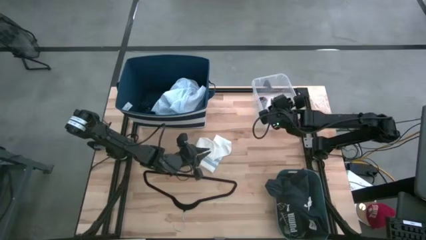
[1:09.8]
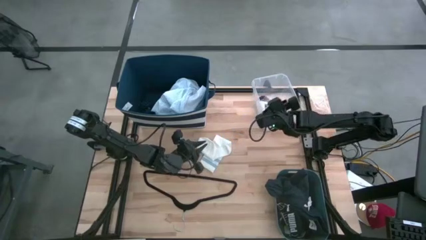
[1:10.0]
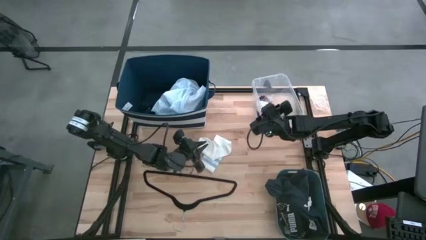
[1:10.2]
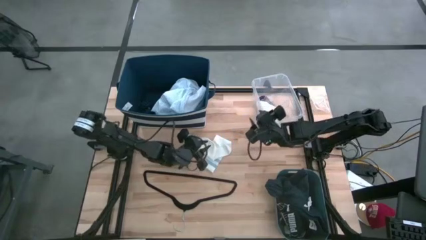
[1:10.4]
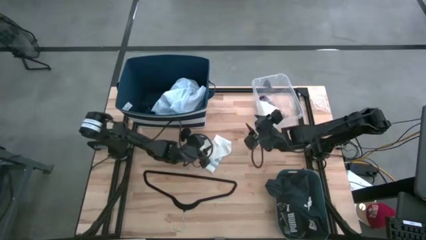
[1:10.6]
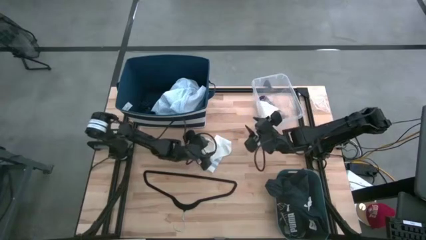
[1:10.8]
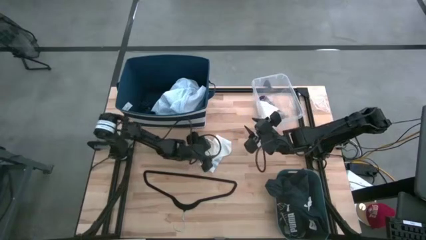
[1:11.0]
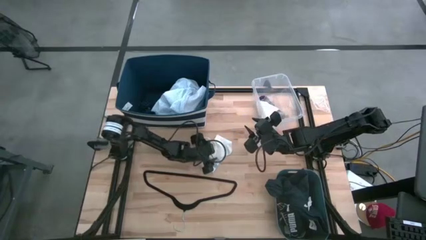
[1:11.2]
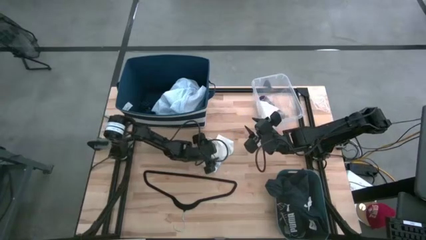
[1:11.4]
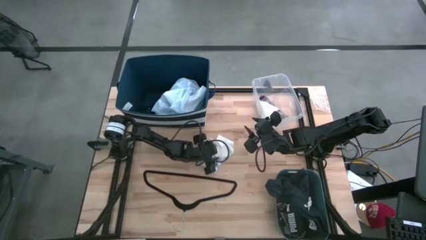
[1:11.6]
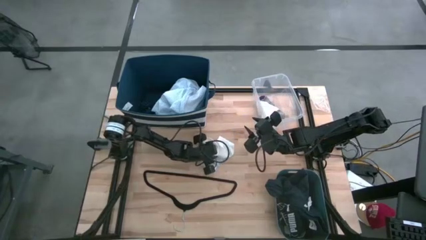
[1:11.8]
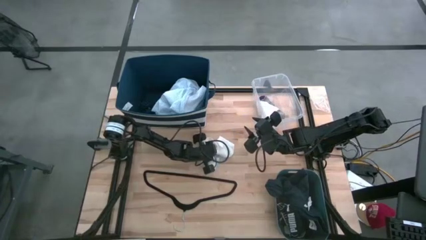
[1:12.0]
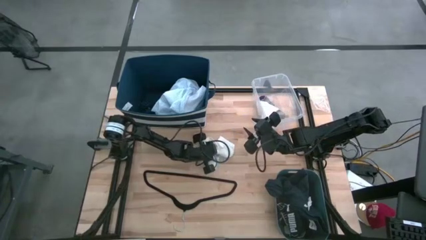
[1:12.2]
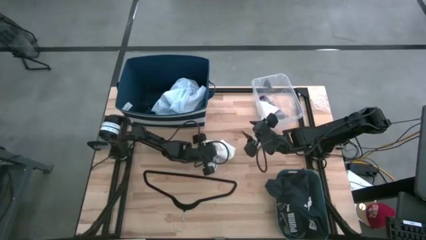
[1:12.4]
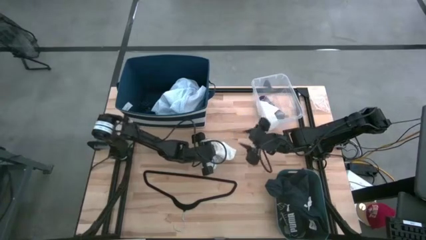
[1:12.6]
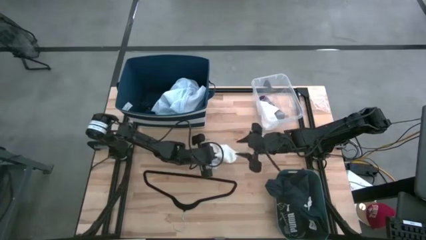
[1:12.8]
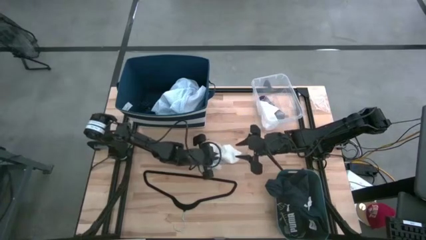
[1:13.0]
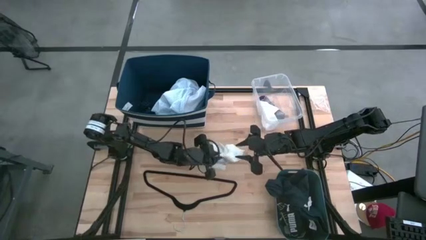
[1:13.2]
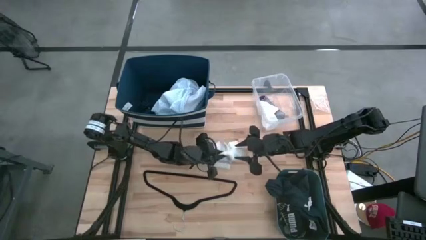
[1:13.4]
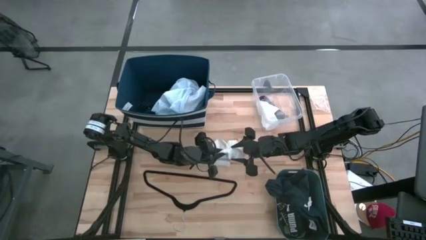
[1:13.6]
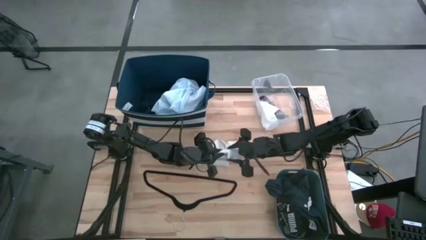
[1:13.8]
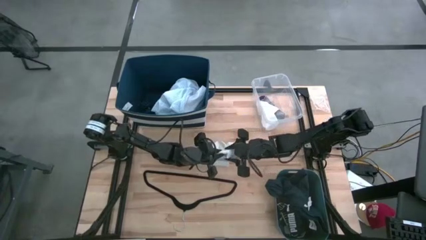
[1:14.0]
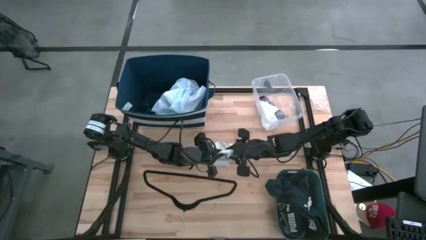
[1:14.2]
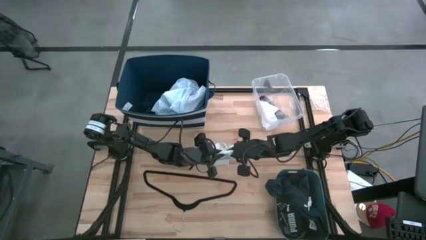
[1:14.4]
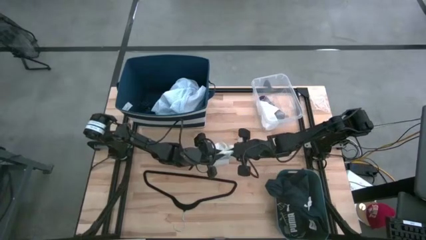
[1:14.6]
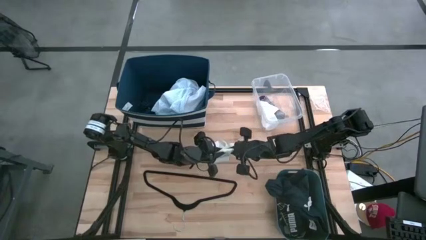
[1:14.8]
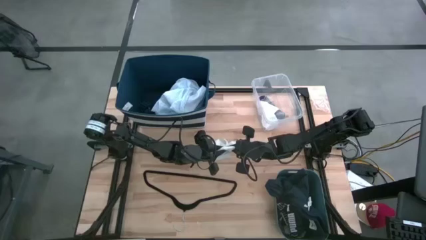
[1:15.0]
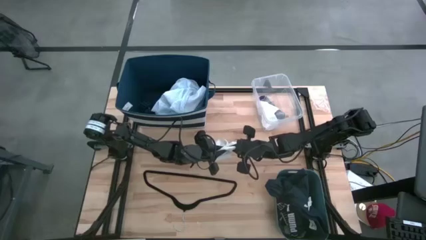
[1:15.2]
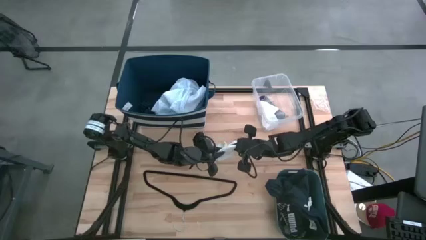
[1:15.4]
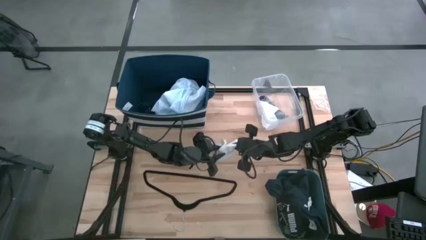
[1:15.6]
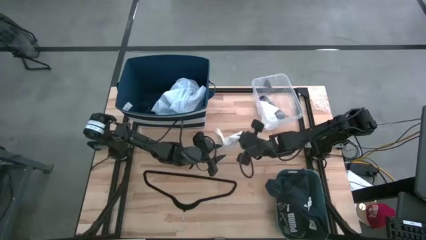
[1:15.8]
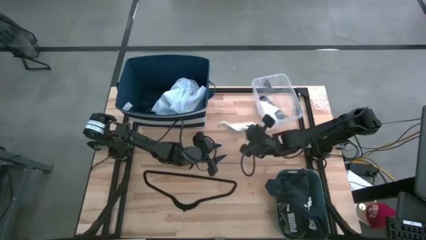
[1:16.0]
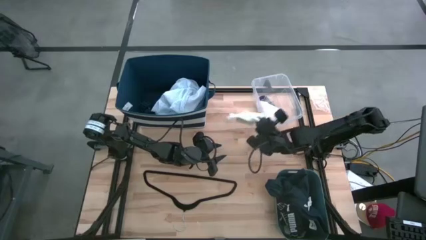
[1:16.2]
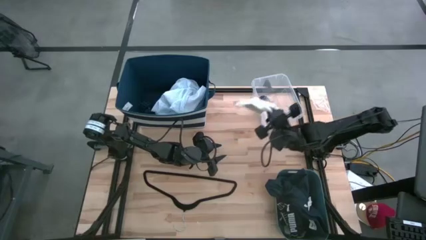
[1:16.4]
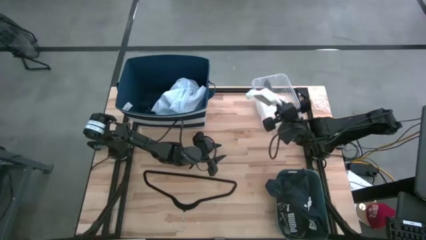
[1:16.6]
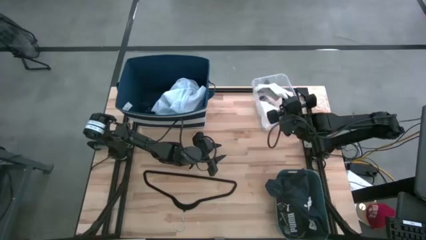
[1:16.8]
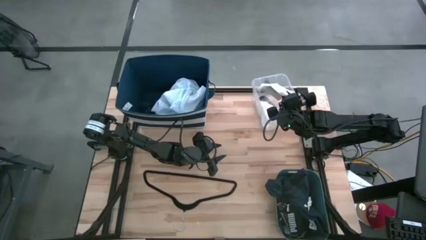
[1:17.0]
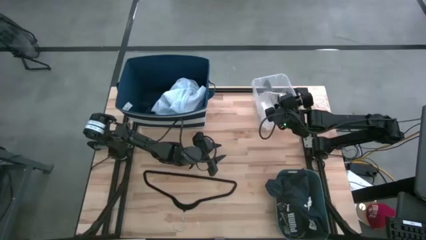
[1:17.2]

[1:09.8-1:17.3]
Task: Pick & Place Cloths
Put the white sock into the transparent bin

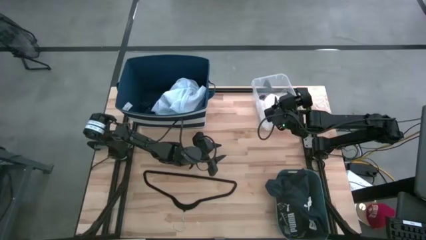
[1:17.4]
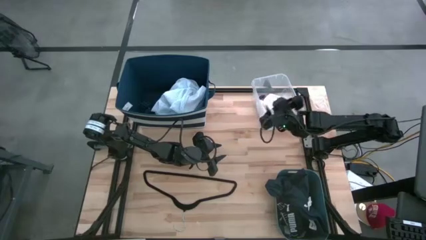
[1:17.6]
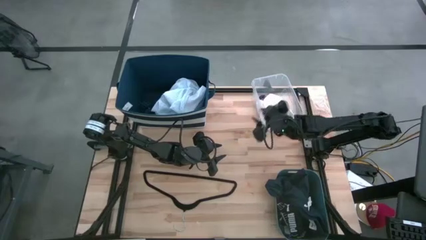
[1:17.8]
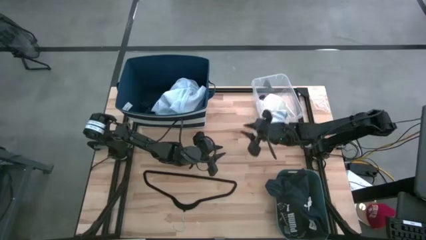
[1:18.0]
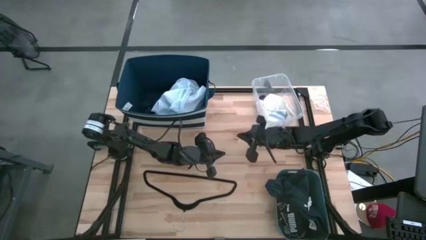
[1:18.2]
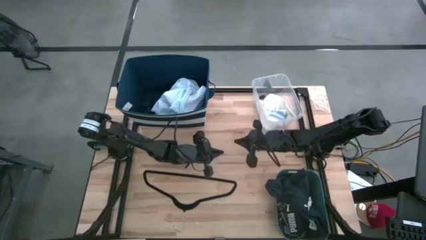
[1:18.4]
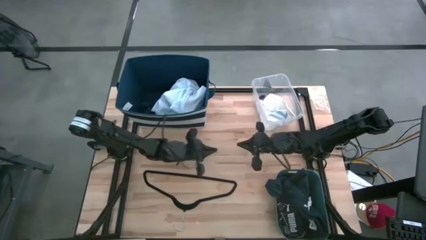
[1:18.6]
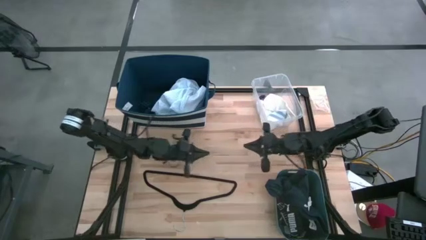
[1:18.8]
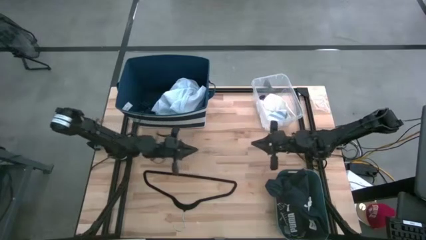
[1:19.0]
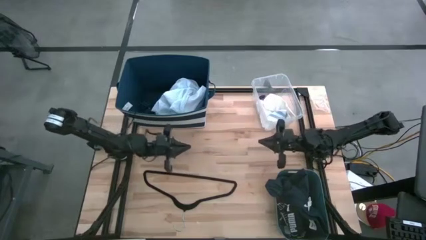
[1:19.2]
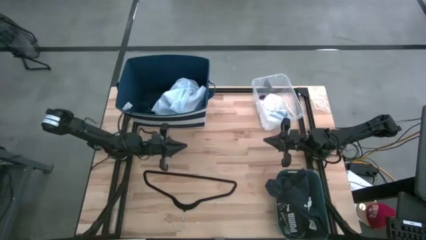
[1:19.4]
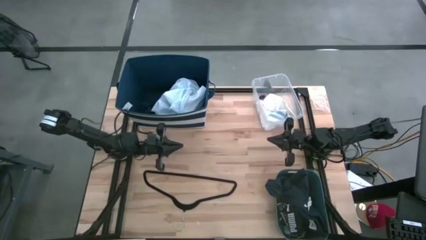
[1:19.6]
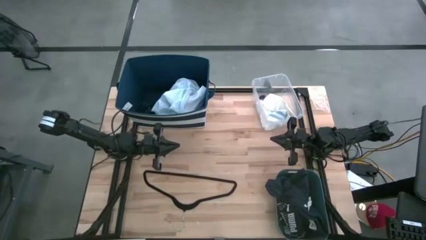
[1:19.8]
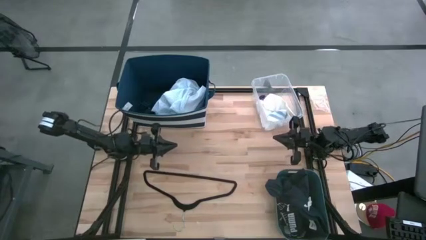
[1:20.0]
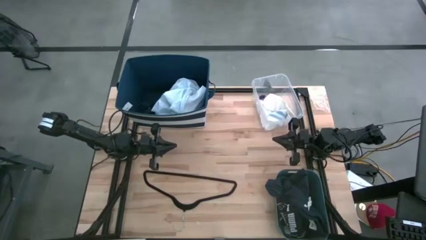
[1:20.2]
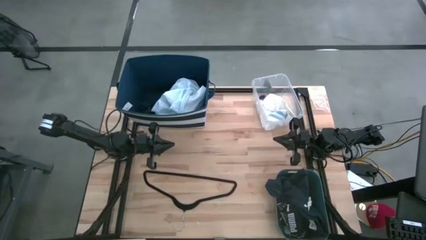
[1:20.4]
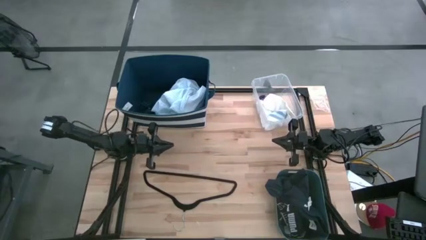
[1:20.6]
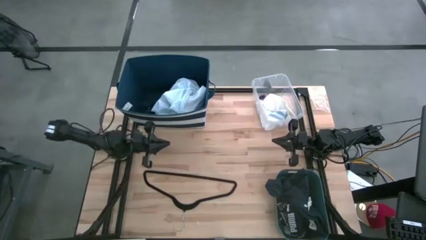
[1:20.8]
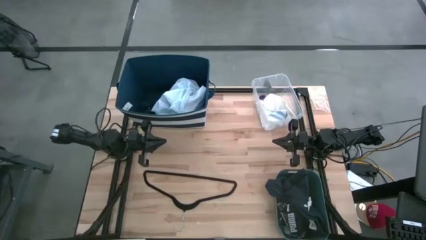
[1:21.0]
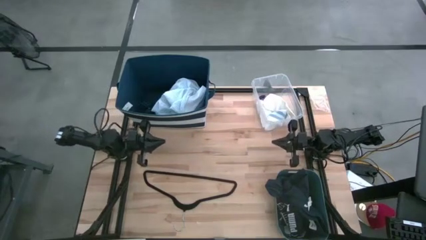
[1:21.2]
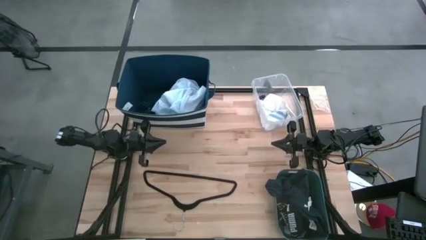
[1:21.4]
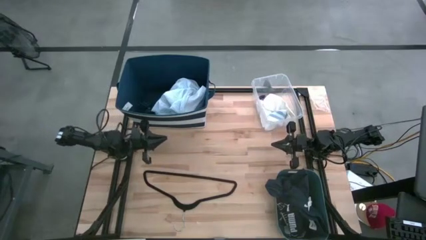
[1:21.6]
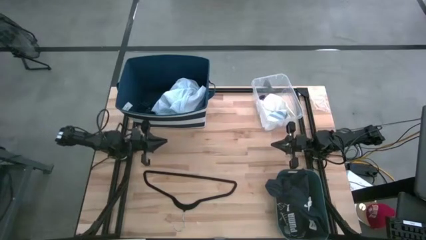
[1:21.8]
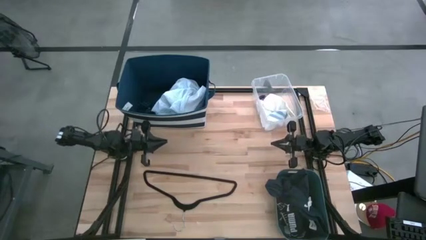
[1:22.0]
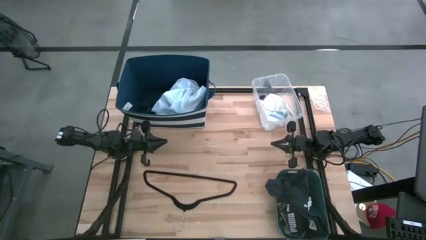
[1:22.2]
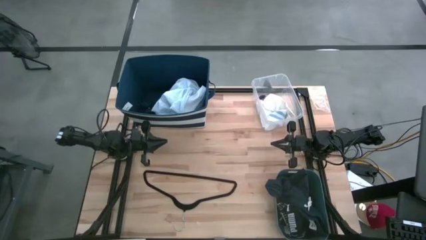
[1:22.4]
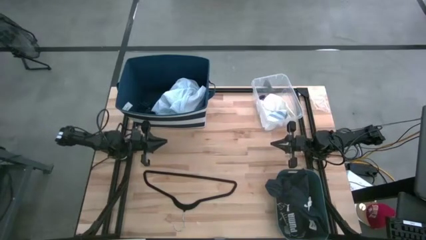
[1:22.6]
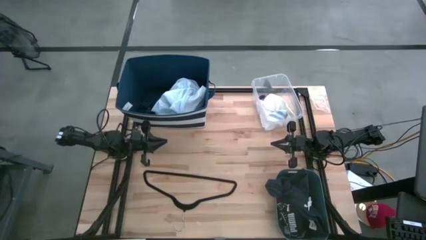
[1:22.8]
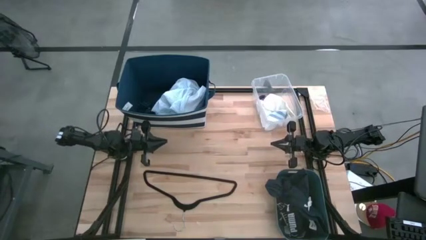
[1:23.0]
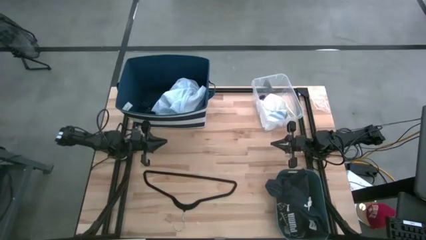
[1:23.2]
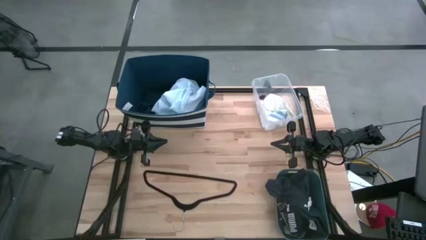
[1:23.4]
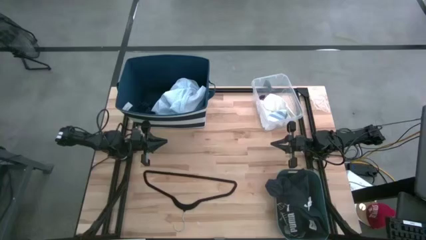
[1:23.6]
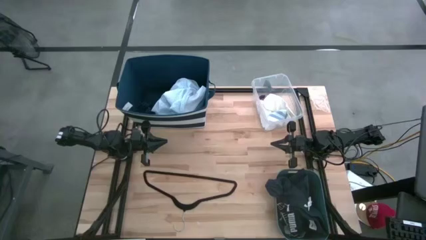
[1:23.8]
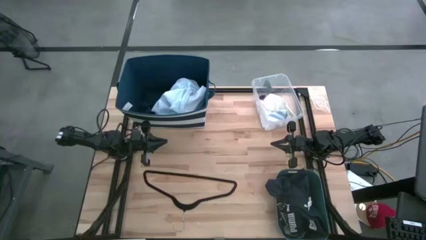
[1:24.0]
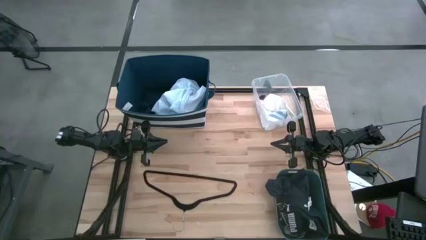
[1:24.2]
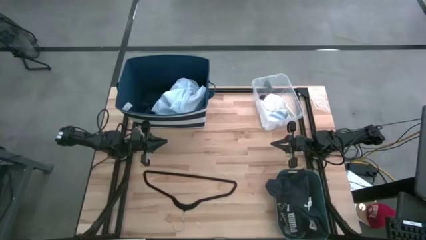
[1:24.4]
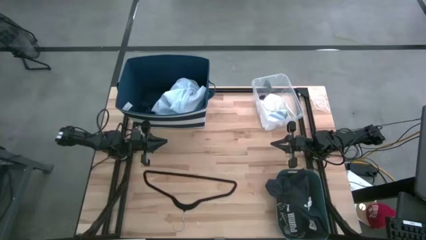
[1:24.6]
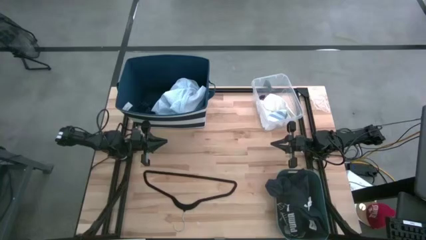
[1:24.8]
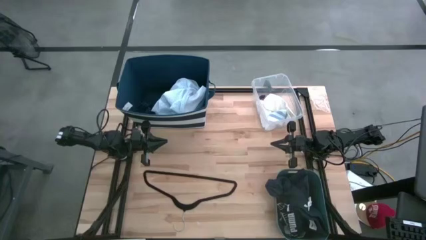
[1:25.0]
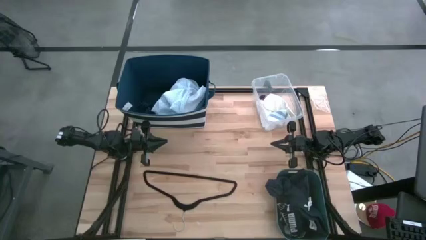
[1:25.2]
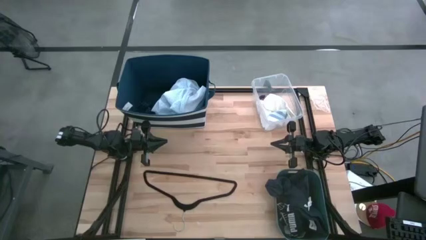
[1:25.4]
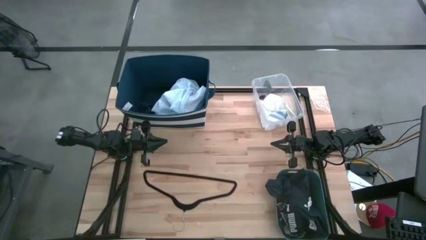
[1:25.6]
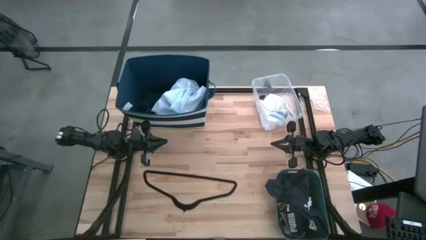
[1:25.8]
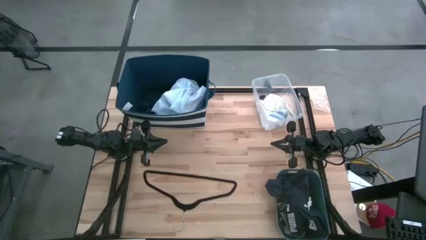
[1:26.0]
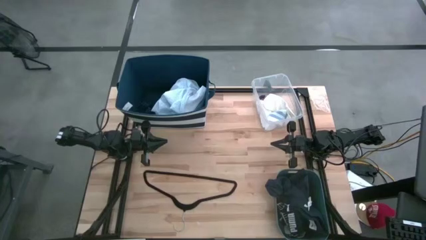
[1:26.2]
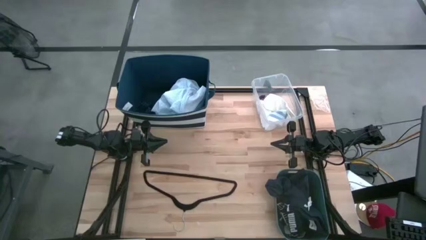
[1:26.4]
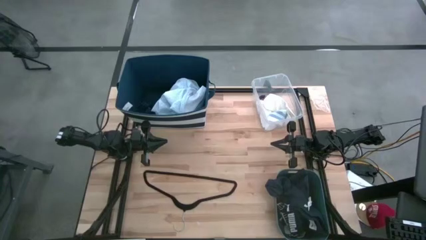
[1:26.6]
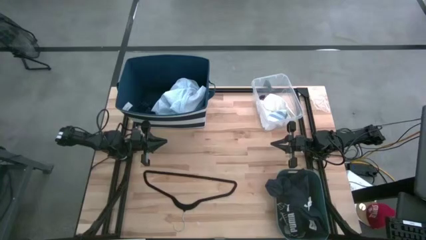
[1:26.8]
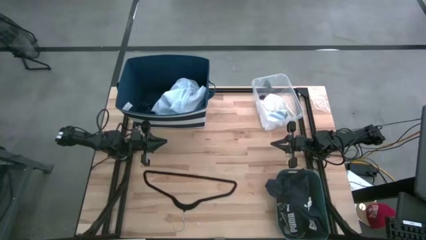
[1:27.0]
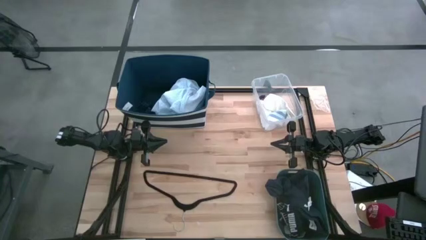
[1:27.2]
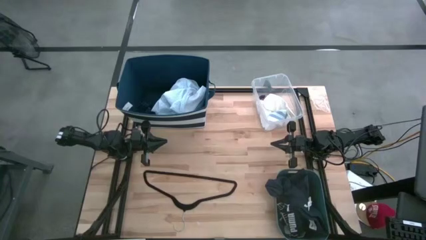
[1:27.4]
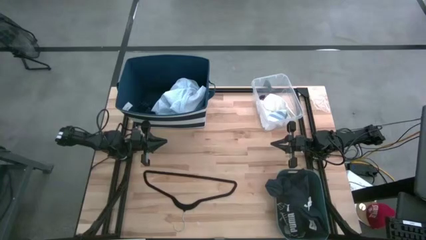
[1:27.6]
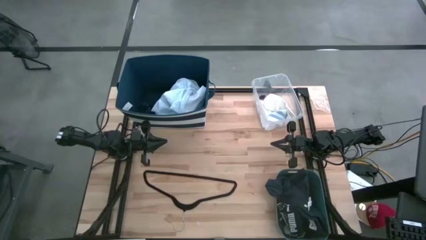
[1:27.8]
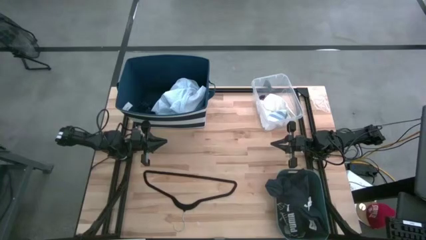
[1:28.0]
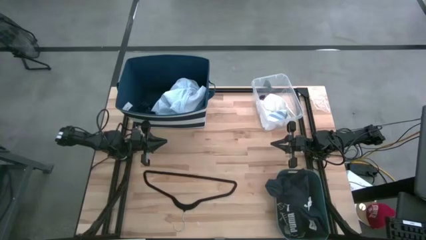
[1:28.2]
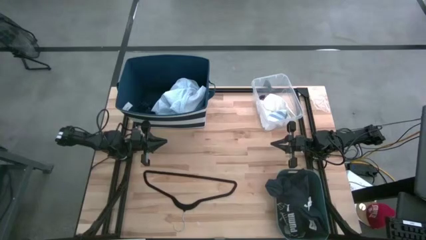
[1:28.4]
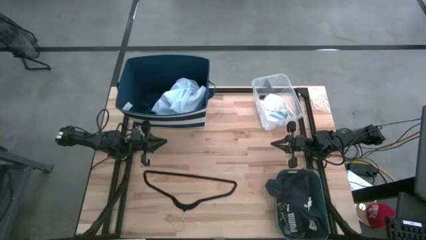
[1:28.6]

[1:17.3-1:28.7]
Return To Home Position
